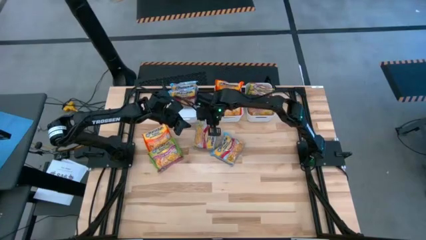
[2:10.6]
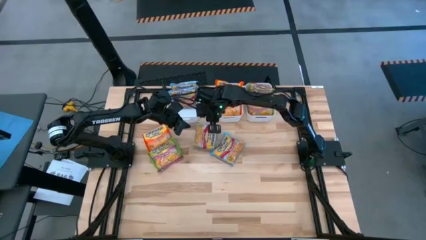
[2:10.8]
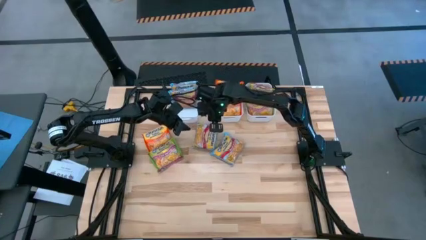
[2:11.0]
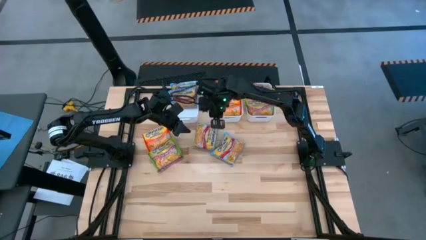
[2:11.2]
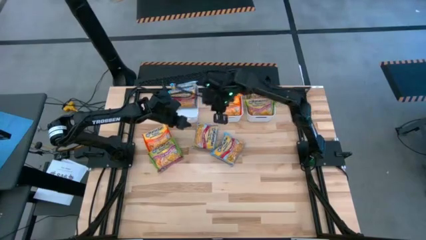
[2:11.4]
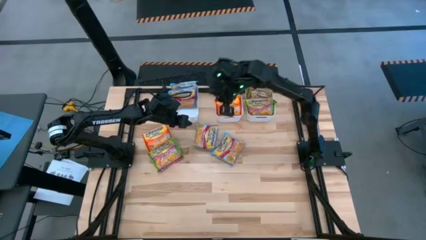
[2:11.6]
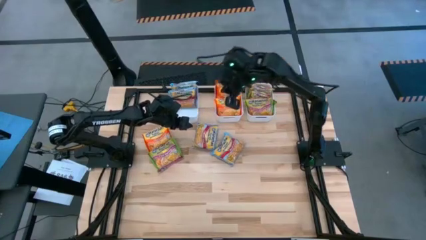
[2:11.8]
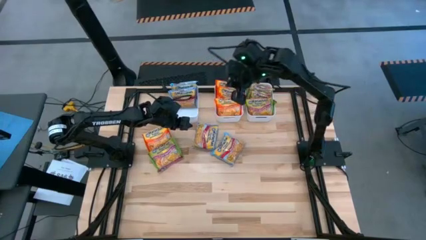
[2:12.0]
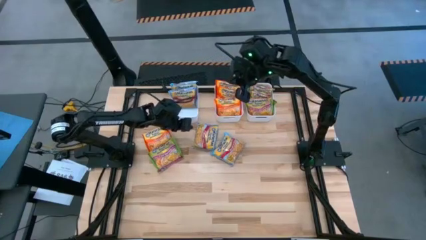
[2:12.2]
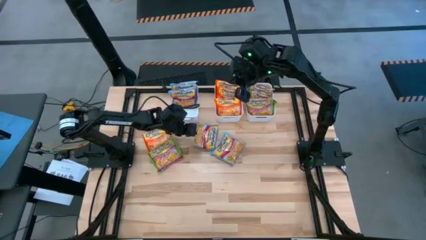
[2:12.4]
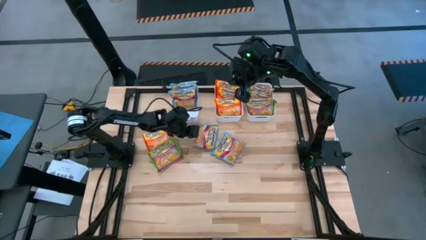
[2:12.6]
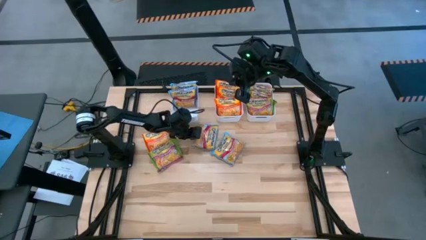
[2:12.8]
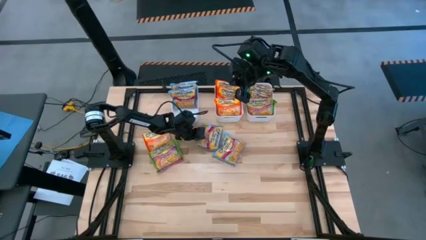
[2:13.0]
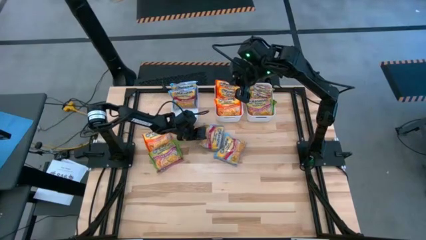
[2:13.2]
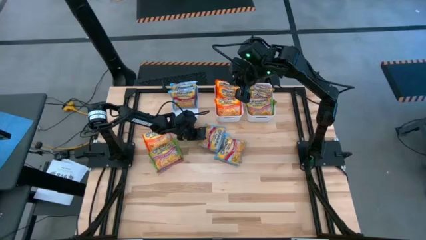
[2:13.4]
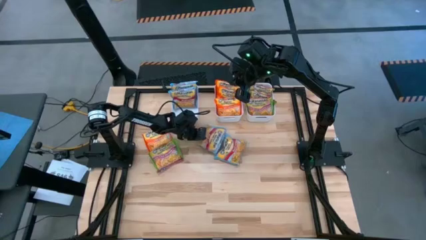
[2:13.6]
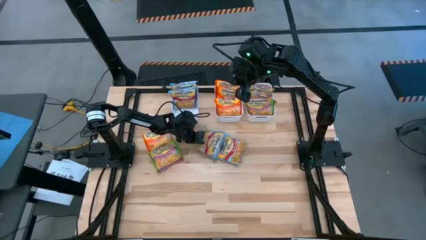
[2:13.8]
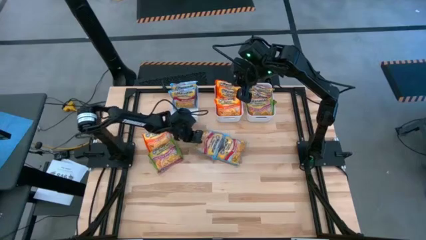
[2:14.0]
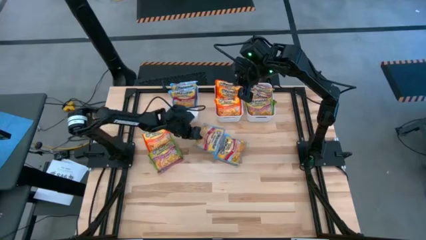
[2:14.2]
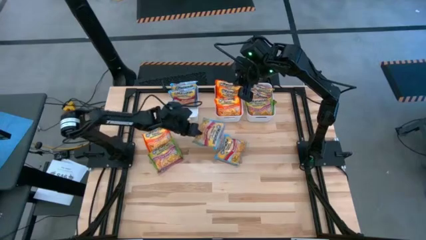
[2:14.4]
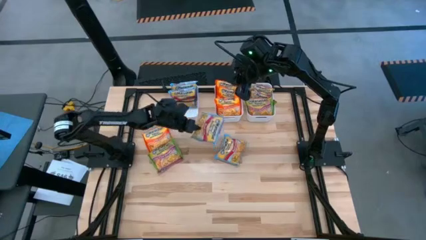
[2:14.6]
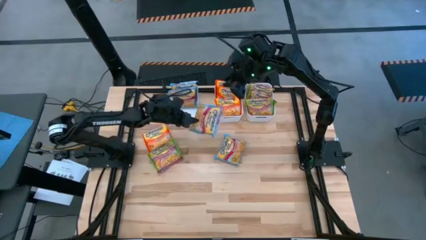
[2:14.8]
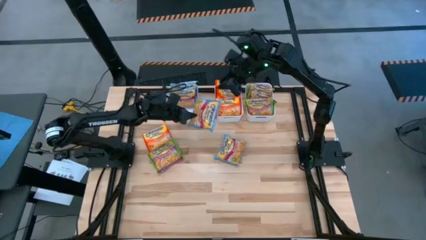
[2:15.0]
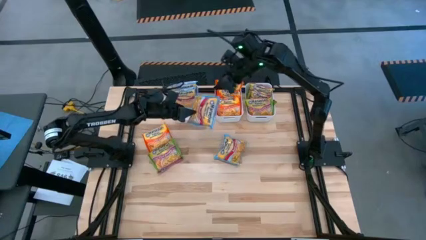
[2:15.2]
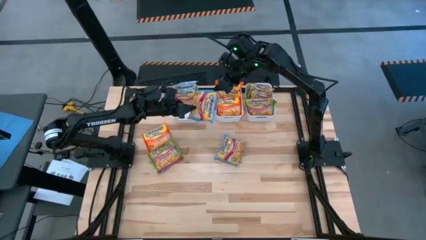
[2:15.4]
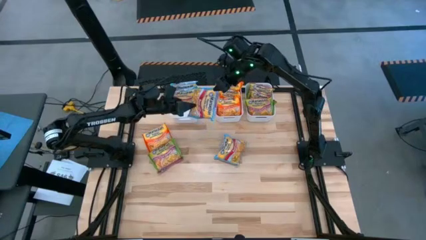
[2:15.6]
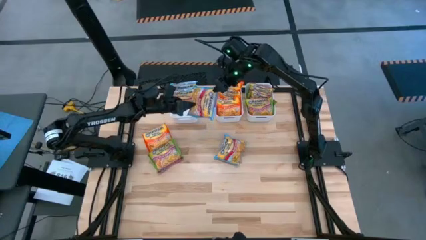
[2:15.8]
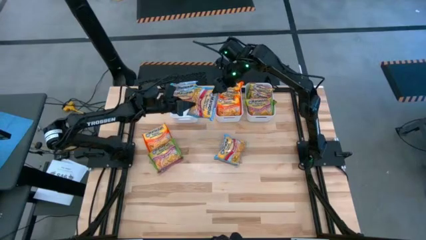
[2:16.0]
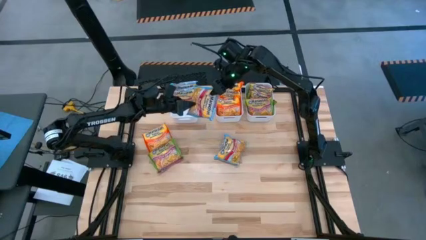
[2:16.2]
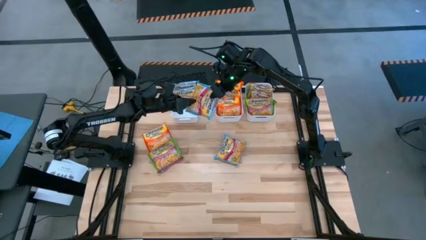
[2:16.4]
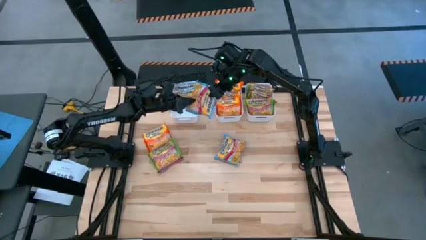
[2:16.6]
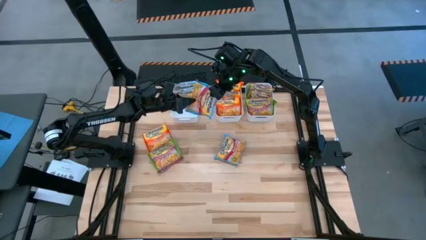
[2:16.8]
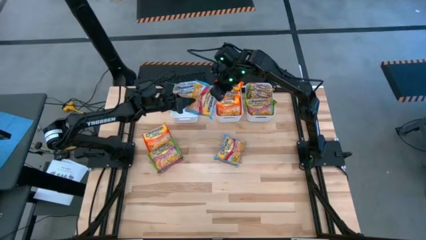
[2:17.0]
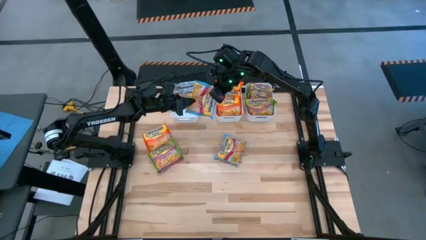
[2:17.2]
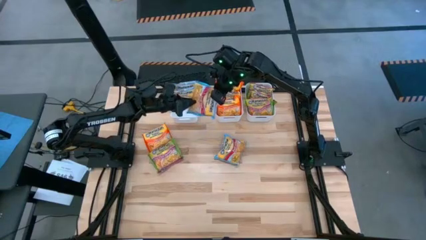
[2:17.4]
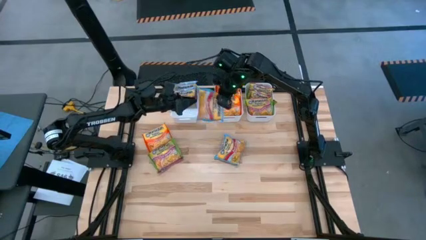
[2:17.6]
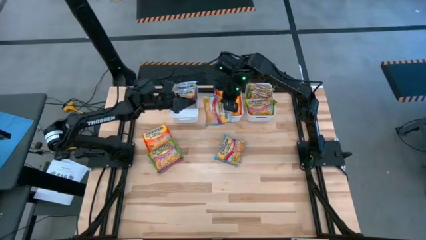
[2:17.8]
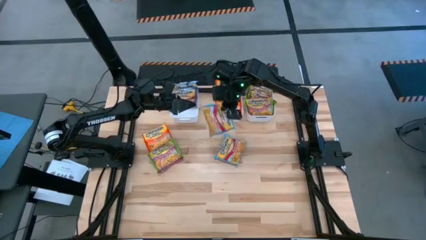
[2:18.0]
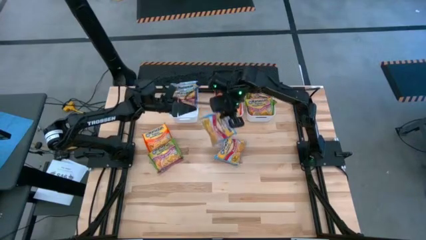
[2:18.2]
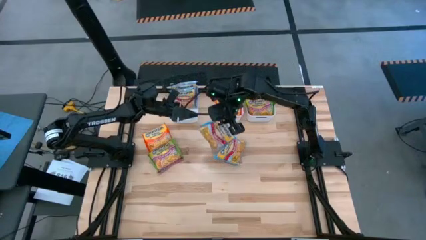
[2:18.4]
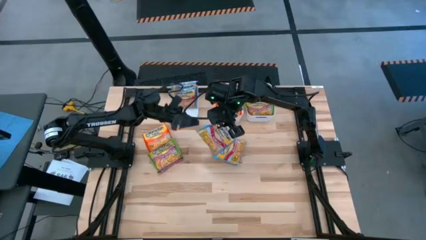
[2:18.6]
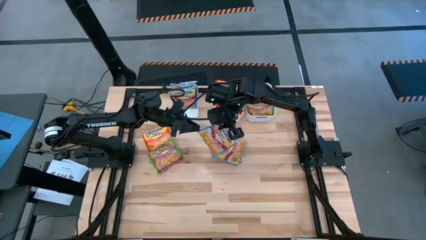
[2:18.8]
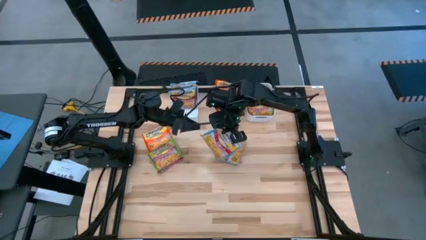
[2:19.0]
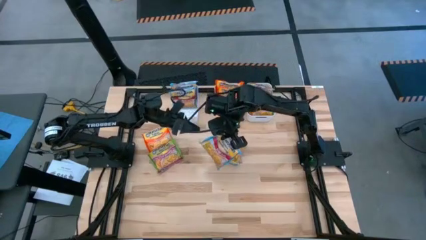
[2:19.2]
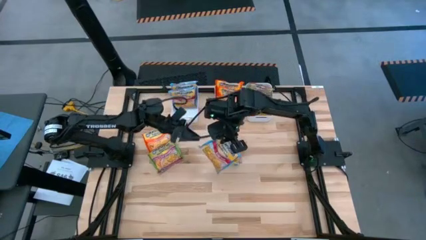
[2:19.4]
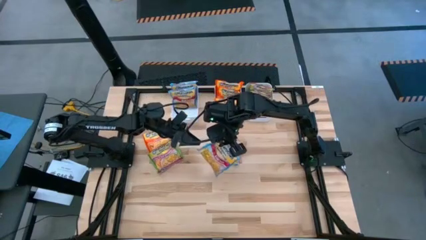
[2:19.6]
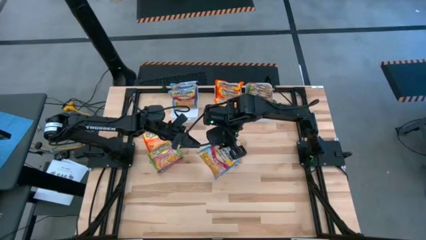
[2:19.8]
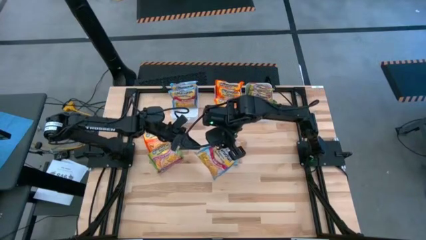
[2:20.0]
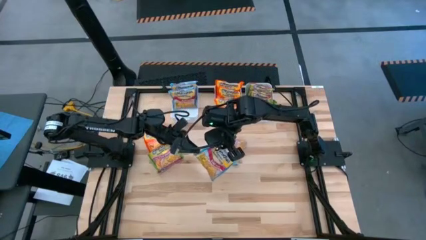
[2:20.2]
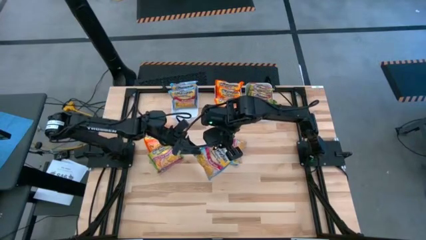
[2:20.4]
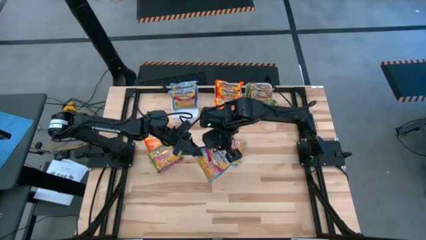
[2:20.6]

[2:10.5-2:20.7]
Task: Sort Maruchan noodles
Put the blue noodle pack into the left white bin

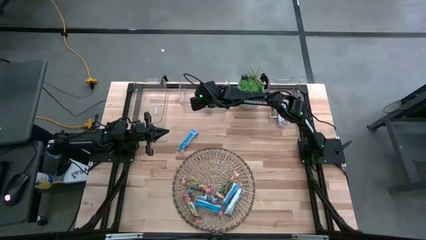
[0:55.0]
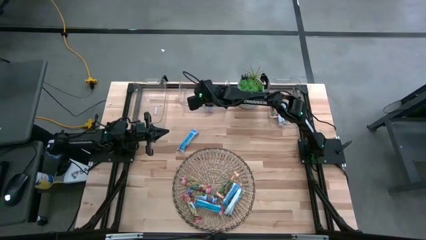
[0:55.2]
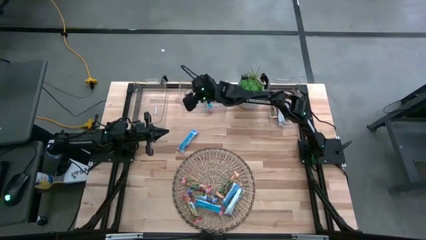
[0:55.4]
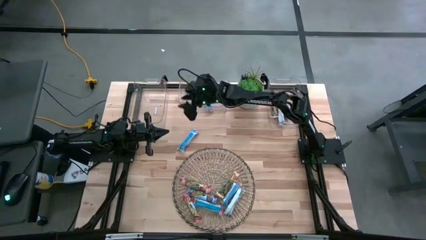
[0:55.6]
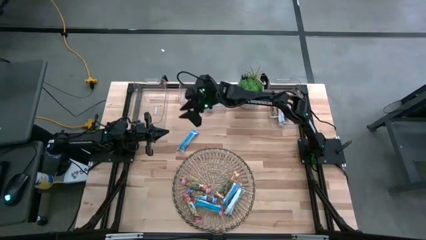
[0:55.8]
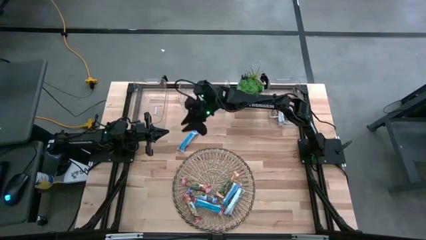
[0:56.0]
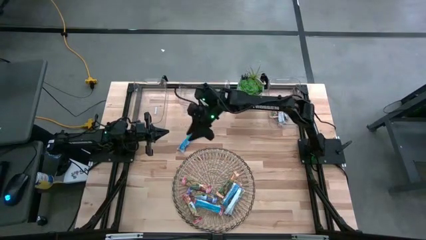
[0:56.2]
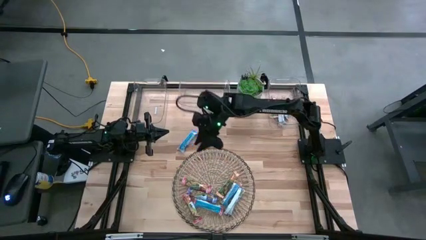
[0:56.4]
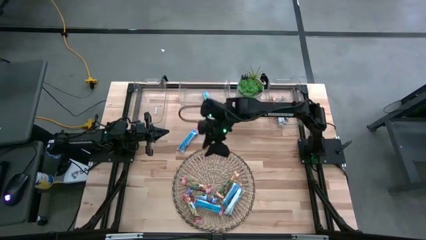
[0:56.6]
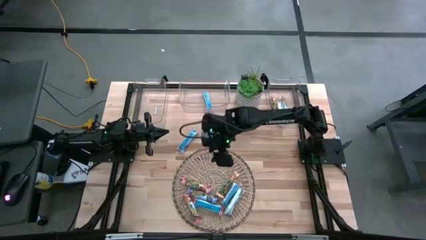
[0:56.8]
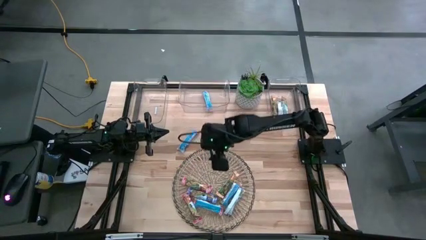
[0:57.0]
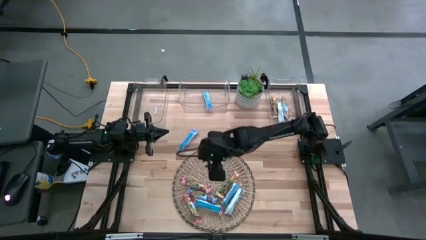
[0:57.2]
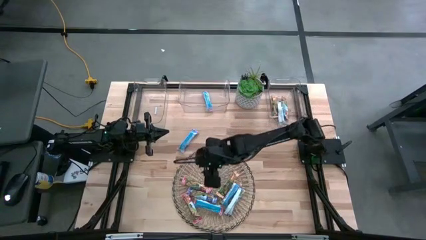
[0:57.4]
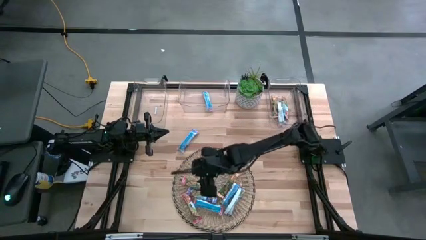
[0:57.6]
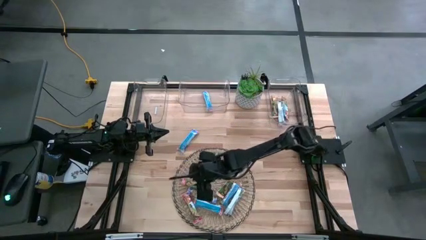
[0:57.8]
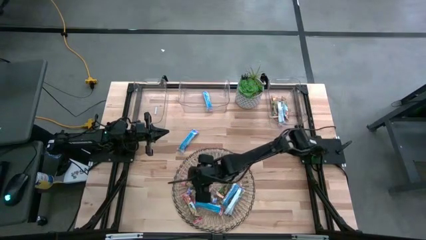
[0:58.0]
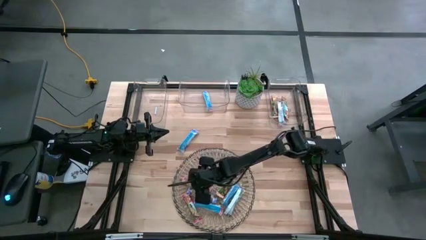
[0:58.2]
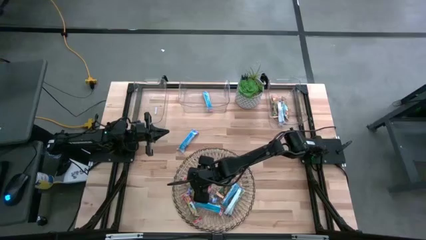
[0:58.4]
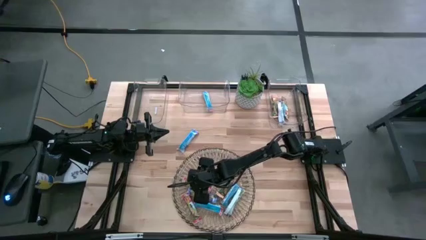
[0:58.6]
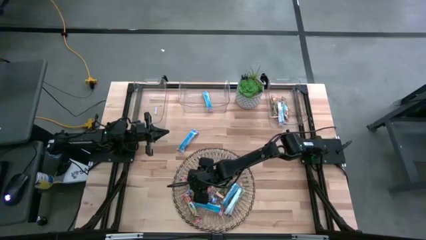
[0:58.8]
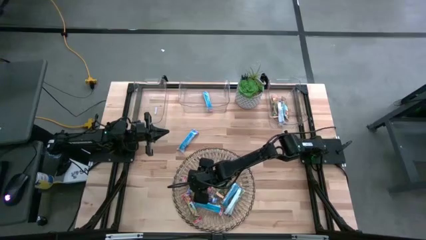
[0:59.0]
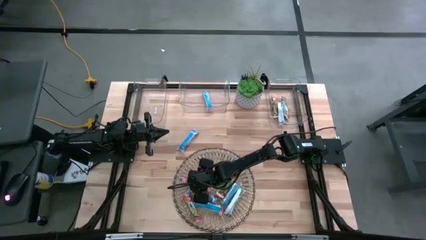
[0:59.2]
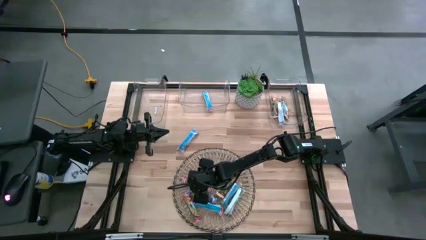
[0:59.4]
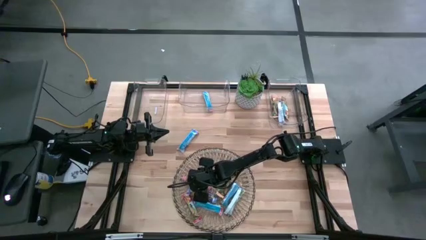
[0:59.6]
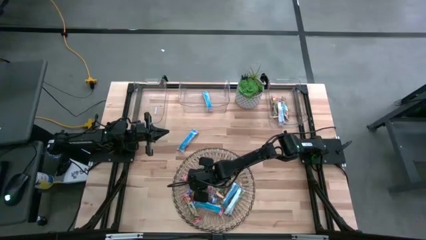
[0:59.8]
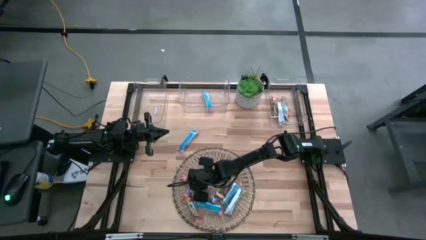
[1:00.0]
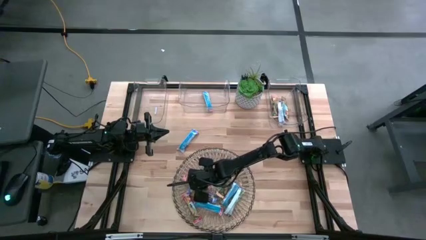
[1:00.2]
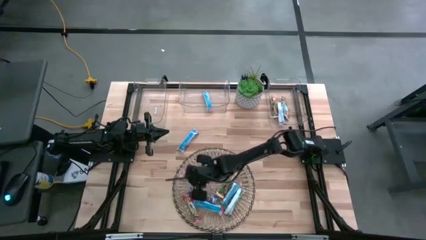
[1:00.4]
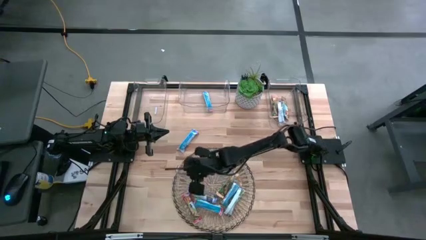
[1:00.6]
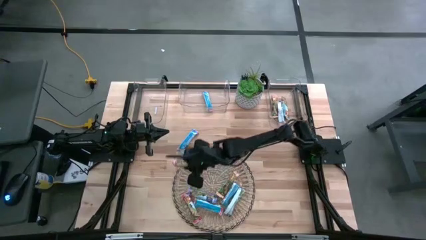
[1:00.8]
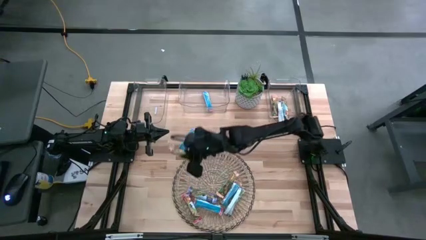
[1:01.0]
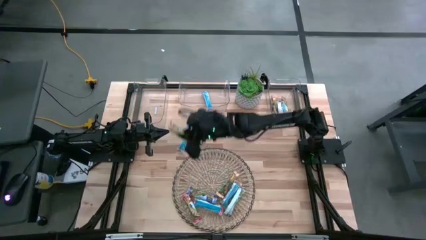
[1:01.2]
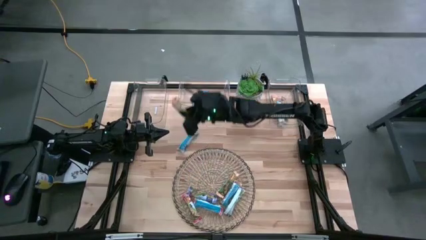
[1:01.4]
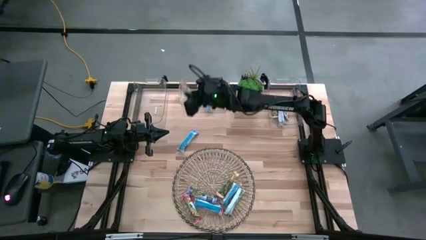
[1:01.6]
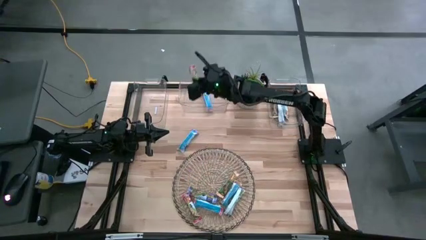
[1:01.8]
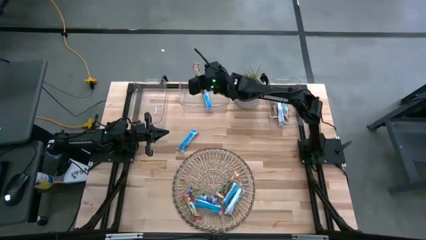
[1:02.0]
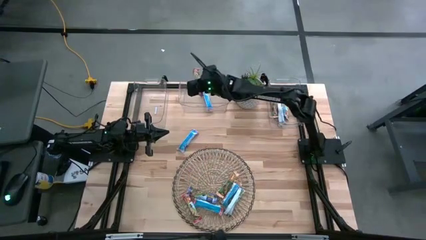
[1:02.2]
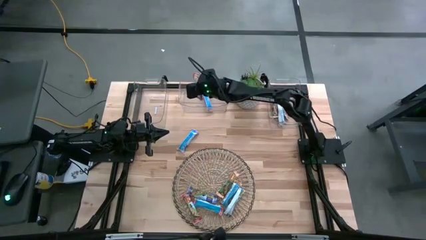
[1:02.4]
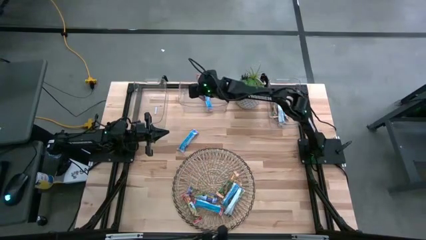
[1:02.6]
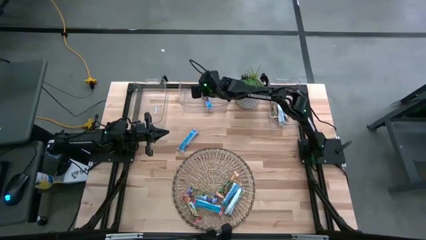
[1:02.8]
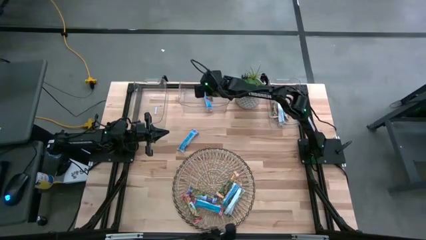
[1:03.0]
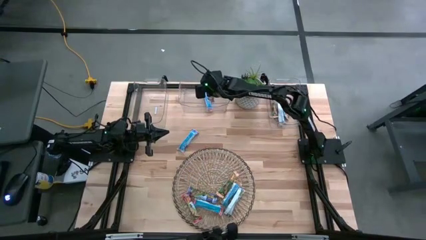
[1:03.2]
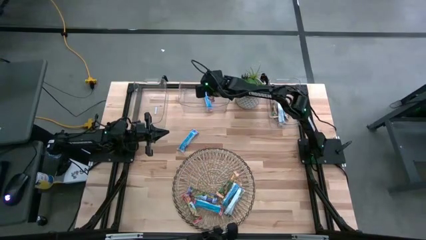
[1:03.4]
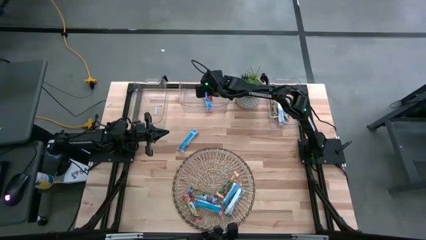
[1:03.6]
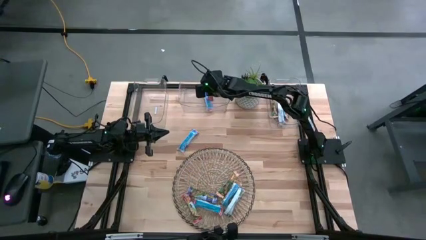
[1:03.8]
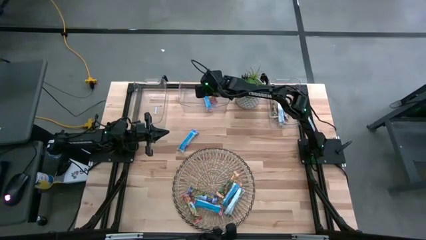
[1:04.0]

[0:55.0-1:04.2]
Task: Pick and place Granola Bars by type
Put the red granola bar into the middle transparent bin
